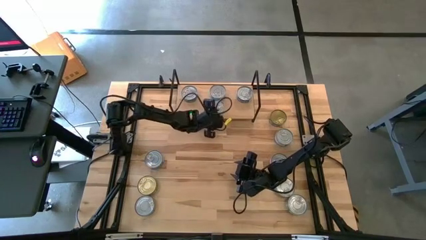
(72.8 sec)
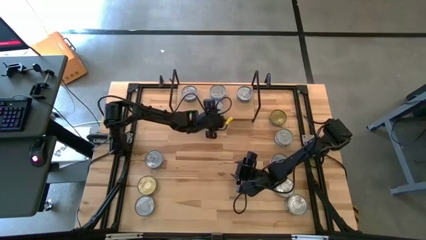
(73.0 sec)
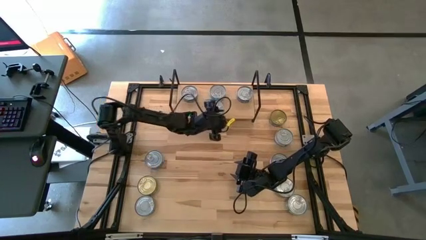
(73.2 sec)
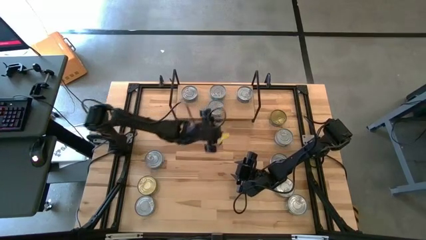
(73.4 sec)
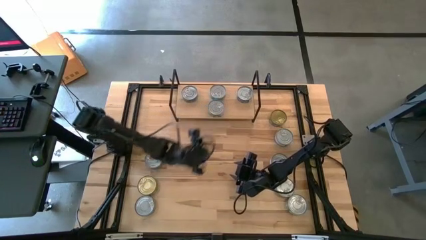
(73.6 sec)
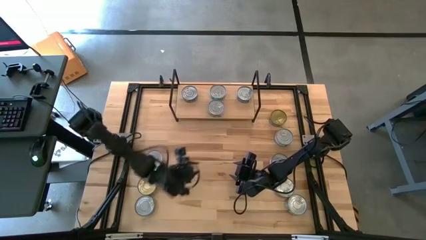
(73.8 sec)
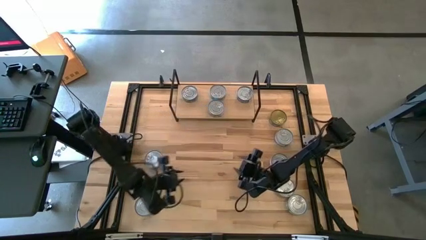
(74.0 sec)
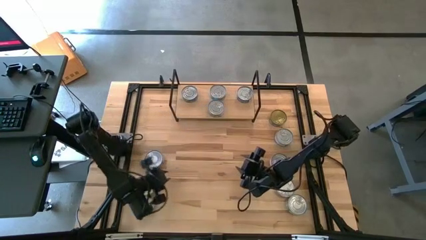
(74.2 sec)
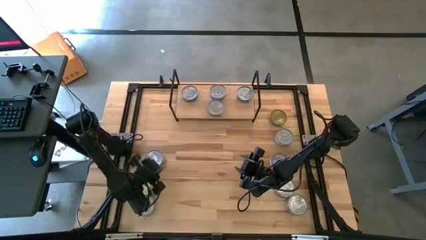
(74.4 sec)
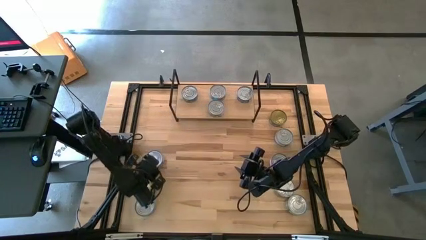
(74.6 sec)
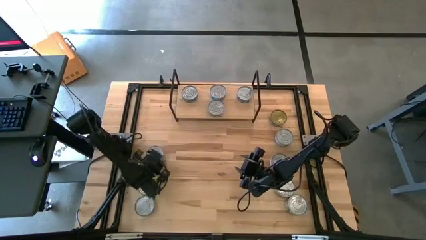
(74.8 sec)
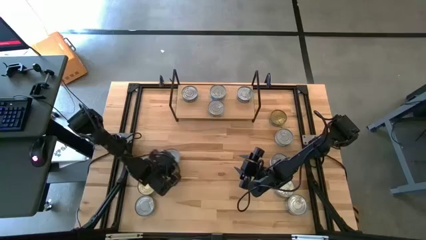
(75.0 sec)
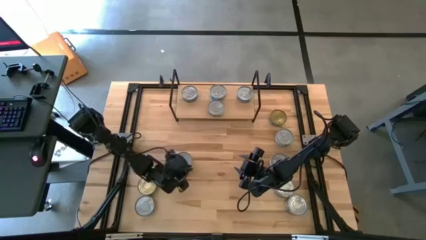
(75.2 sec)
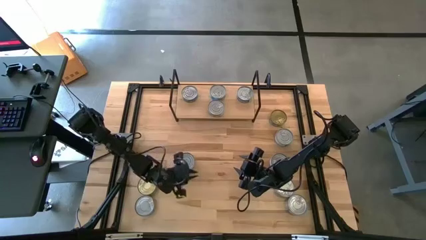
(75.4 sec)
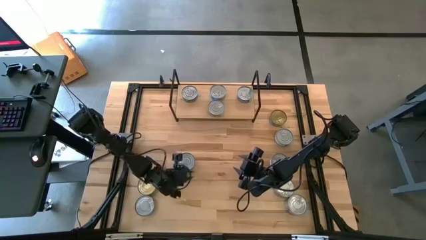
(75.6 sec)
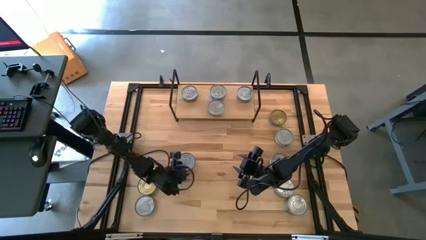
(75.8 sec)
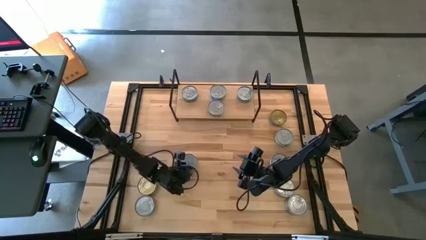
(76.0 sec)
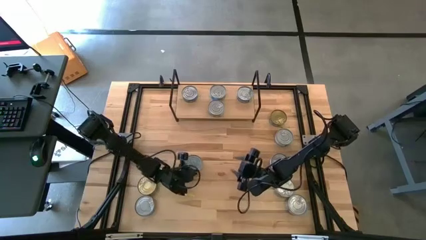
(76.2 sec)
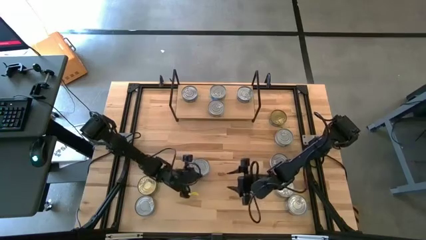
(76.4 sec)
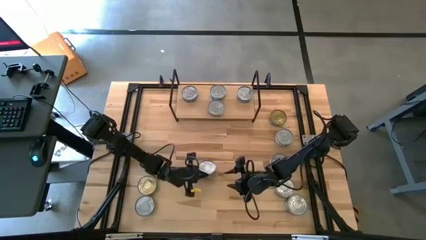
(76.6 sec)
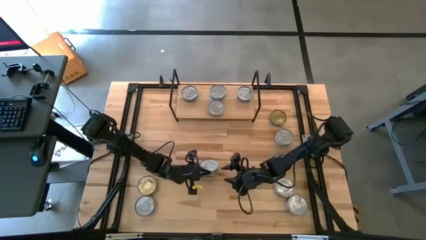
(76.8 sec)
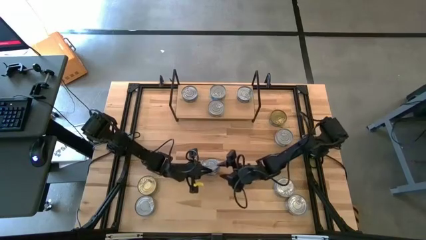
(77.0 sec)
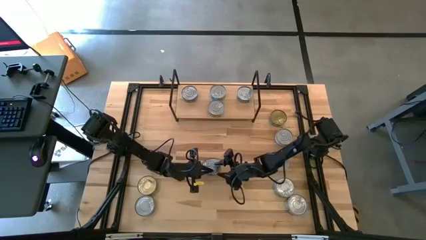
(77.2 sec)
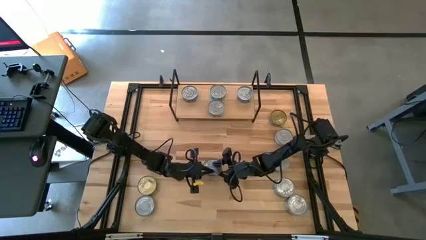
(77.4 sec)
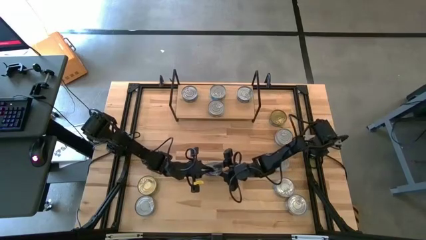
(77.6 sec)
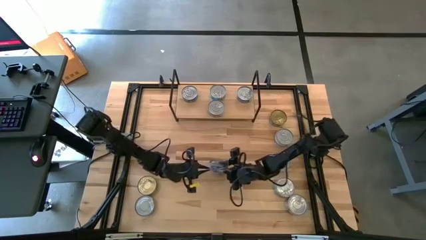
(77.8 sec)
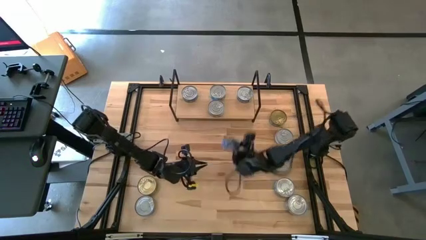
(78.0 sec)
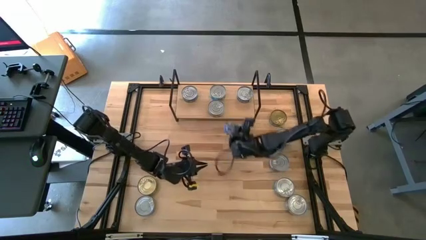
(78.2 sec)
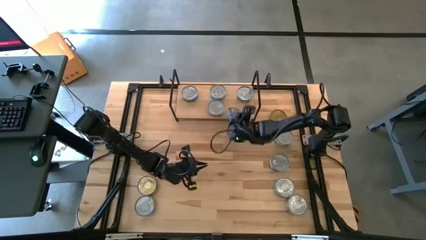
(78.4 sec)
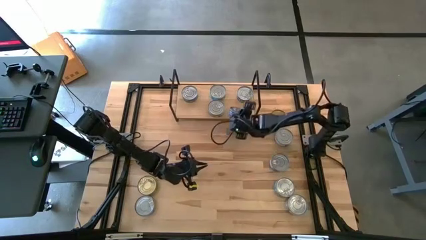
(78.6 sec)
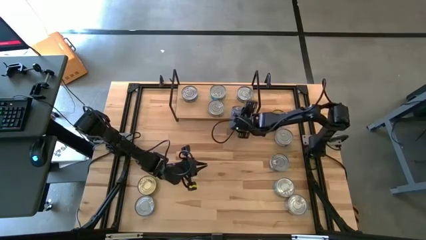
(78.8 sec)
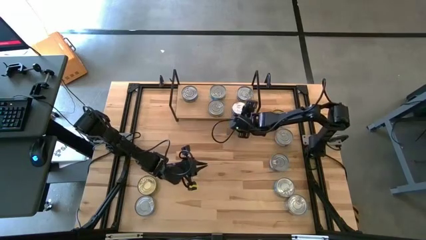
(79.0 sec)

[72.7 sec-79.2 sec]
Task: Stack canned seafood by type on shelf
Put the blue tuna can on the shelf aligned with the other blue tuna can

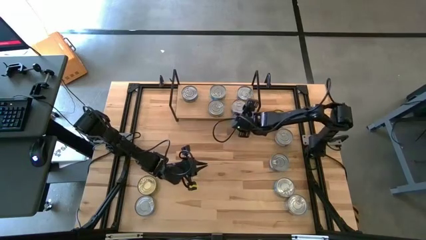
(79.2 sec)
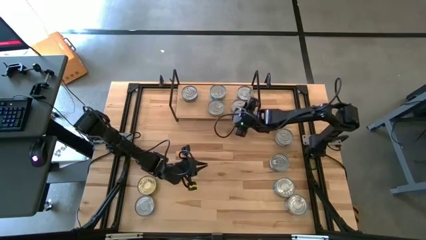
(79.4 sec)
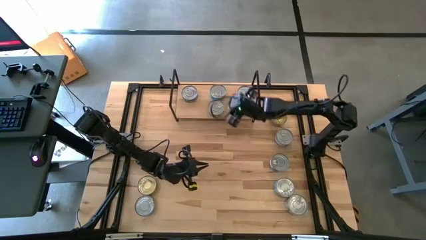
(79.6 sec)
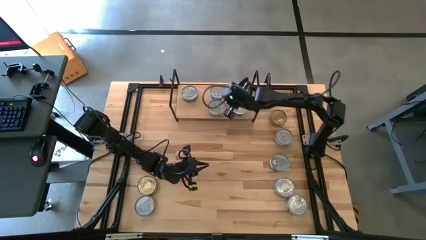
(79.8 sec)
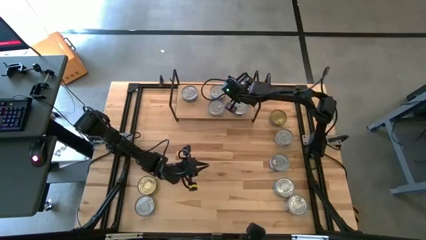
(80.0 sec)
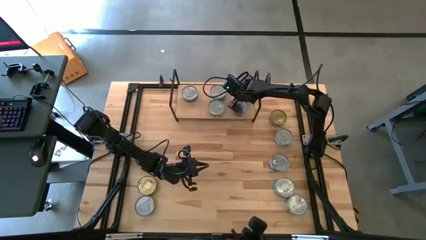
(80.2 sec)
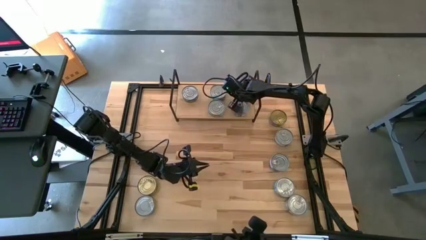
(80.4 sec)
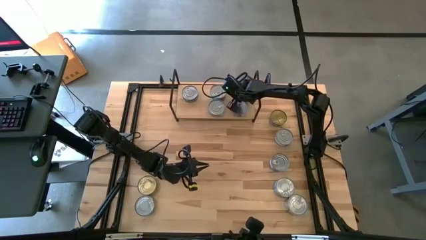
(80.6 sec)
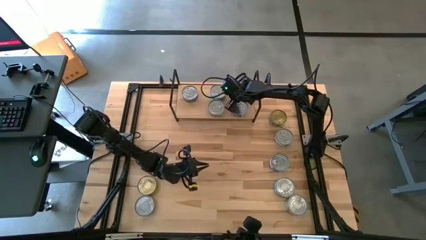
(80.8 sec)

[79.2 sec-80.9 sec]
Adjust the blue tuna can on the shelf

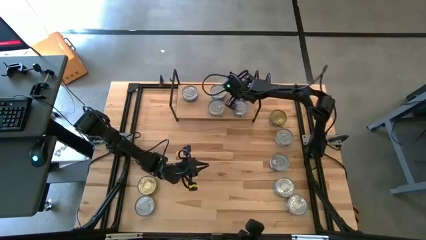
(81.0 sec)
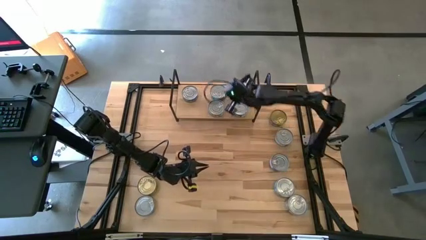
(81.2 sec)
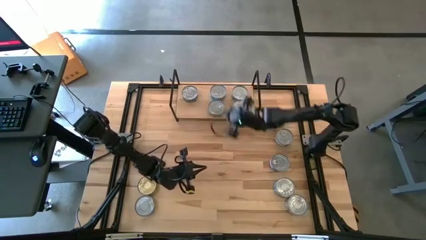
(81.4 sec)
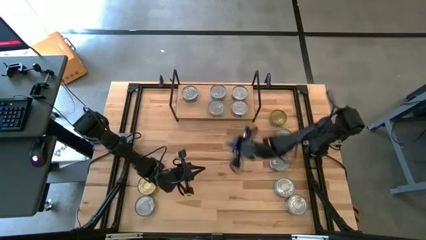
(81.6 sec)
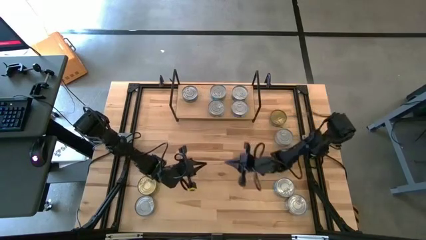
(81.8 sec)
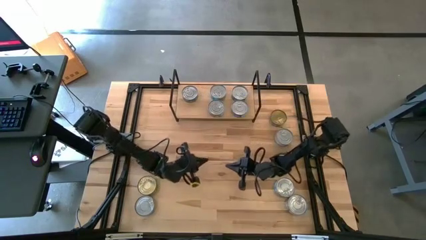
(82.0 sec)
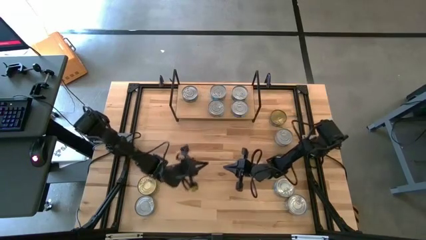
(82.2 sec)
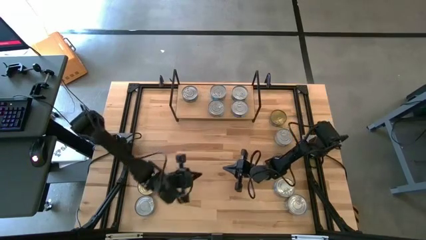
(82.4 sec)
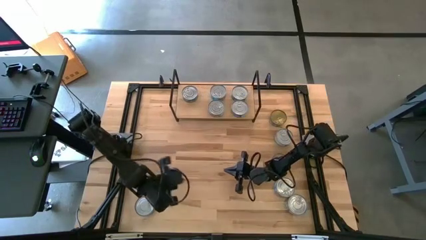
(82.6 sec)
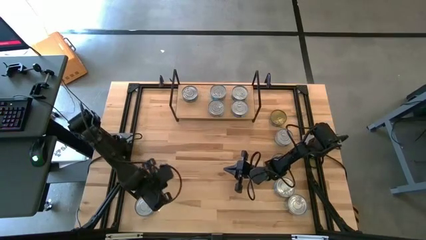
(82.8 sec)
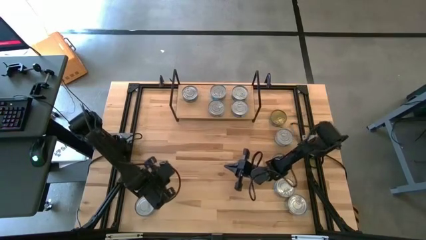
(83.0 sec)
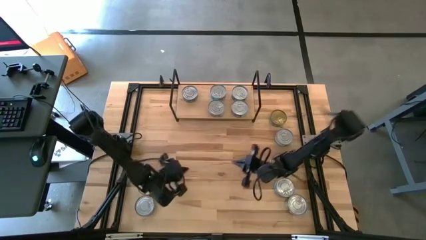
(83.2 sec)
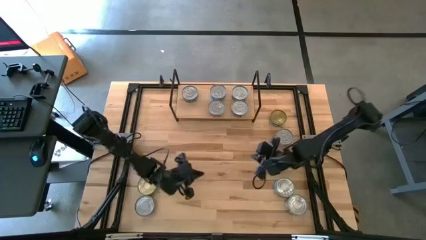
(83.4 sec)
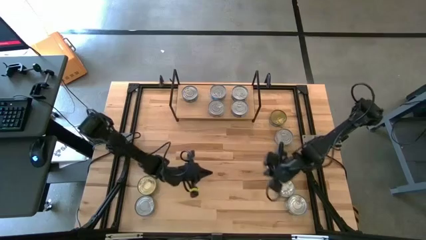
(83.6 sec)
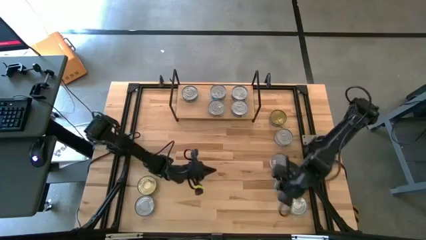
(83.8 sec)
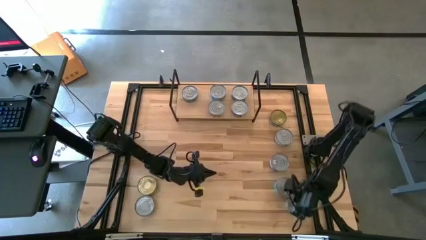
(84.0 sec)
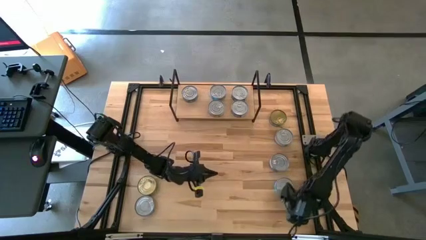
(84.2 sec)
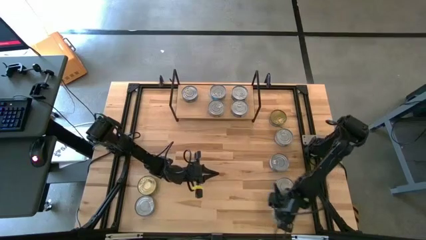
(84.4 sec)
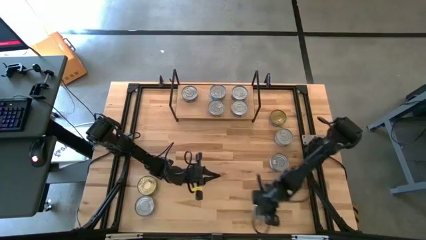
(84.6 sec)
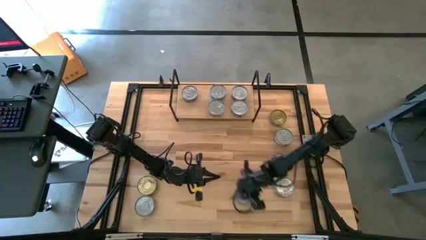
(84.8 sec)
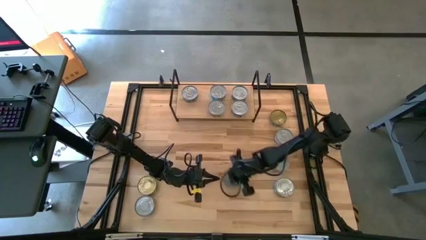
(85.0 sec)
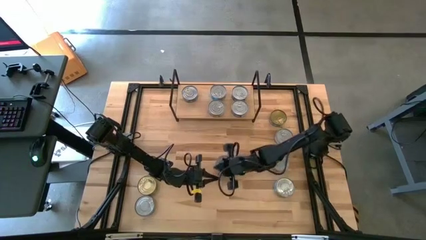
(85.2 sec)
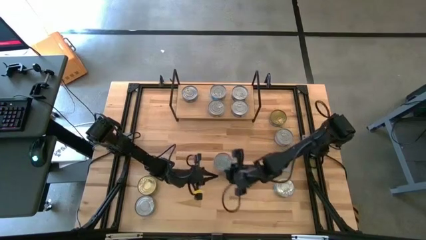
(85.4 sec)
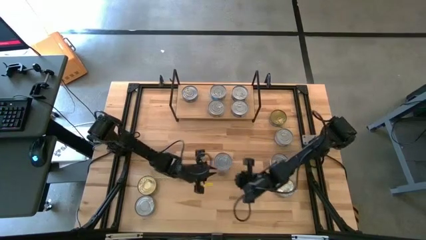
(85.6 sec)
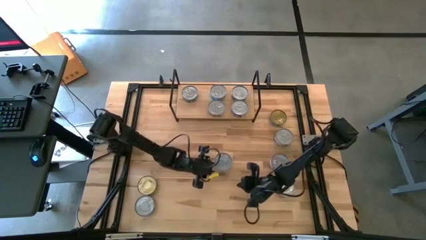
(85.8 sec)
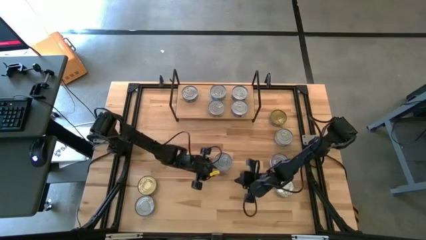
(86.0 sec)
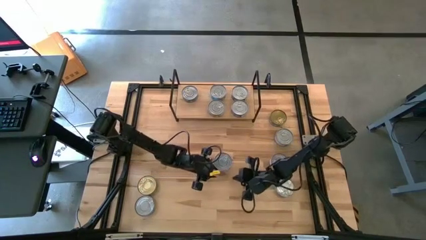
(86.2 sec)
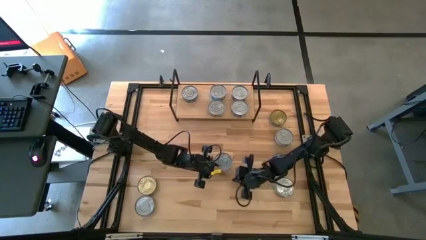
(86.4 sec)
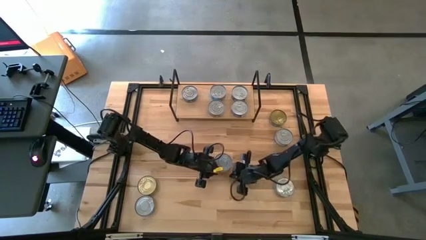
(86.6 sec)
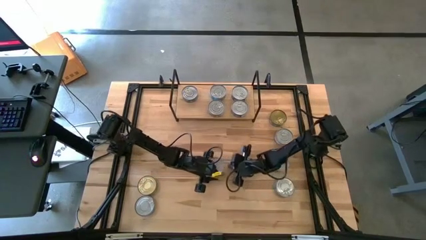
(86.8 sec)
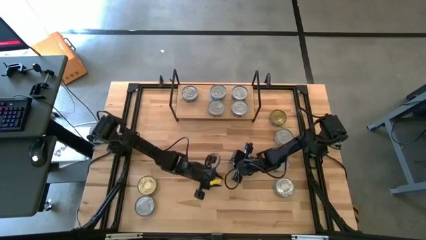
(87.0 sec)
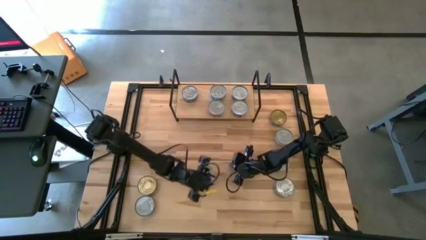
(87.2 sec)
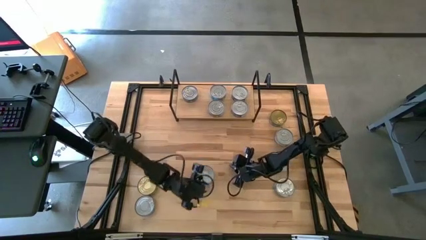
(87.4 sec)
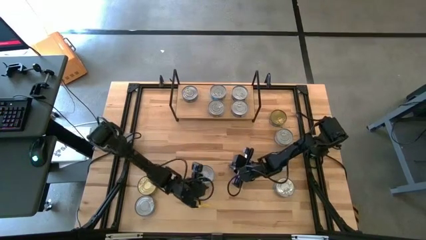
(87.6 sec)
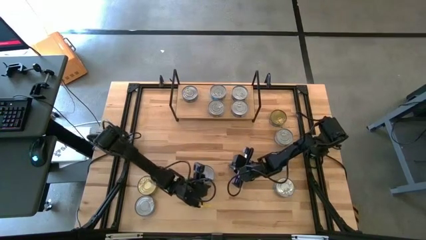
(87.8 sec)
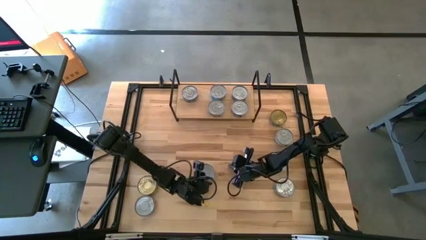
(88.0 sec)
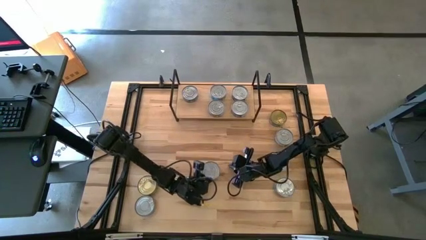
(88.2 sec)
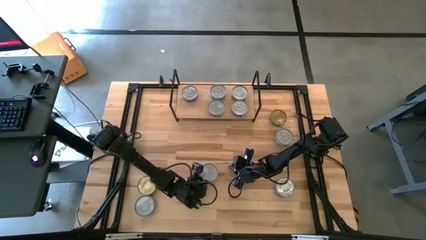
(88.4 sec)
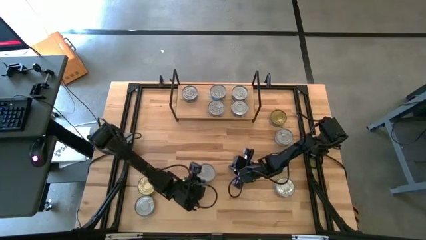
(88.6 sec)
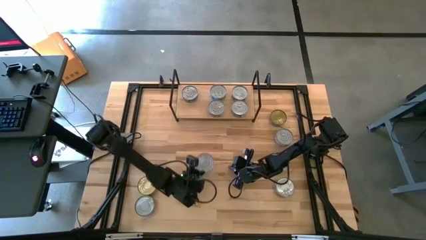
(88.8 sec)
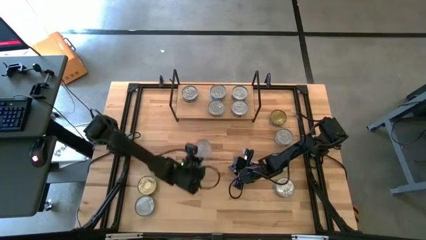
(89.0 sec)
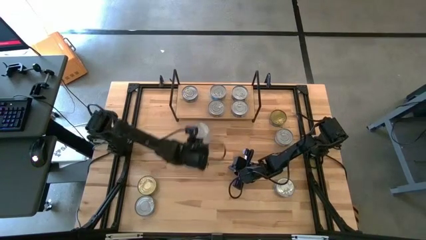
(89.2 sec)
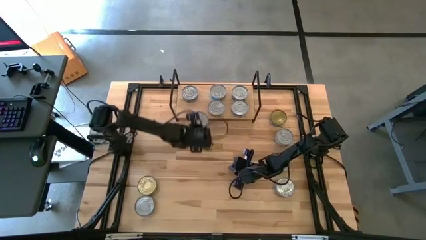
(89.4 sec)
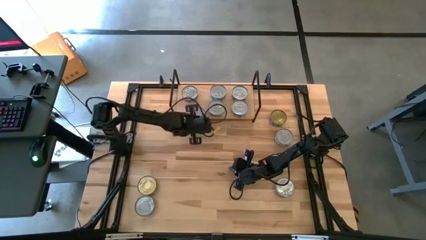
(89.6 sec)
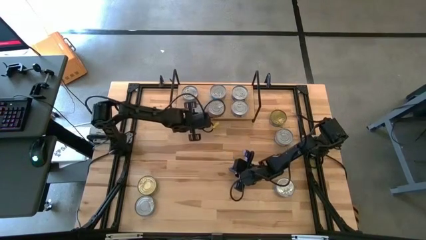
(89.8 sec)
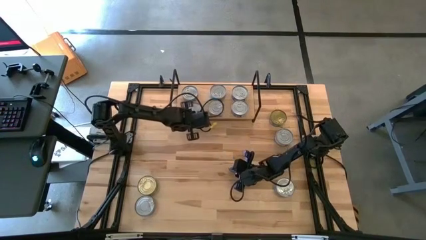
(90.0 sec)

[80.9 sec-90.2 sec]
Put the green tuna can on the shelf aligned with the other green tuna can
